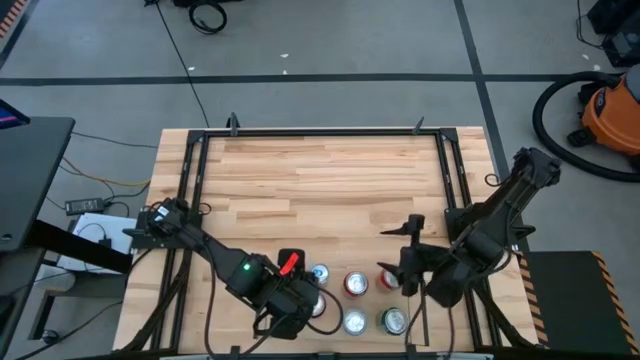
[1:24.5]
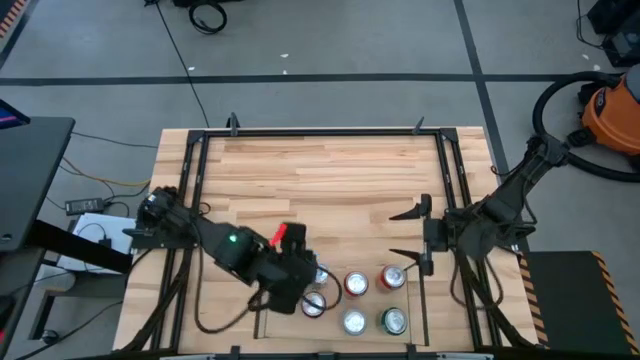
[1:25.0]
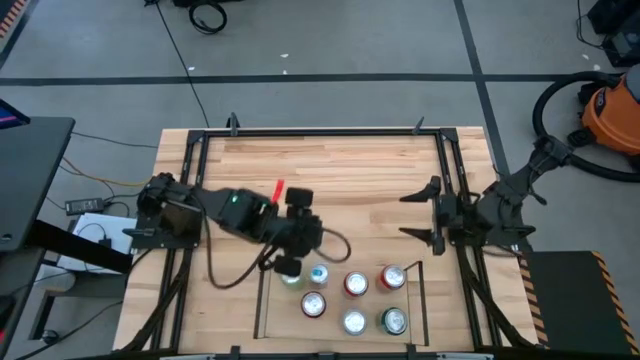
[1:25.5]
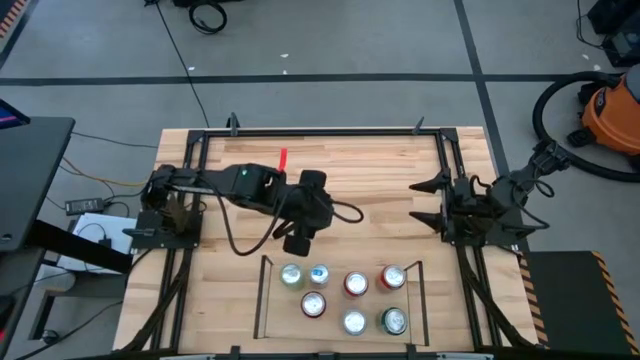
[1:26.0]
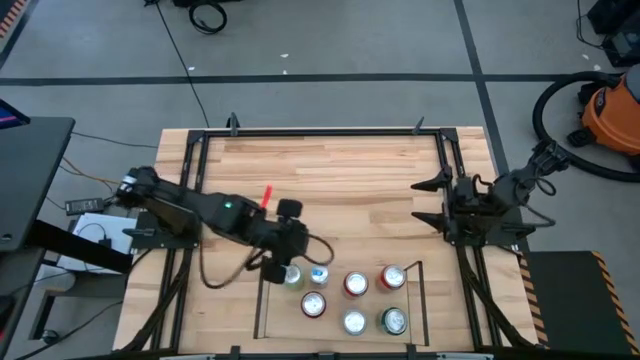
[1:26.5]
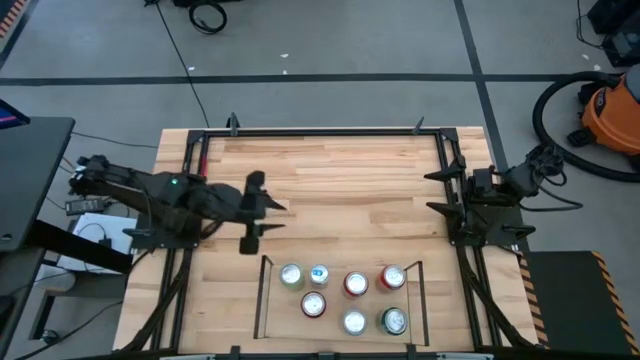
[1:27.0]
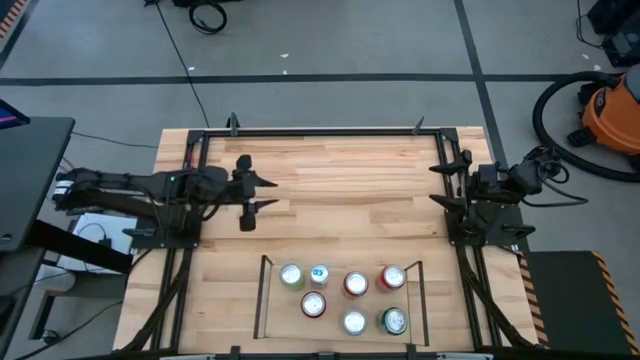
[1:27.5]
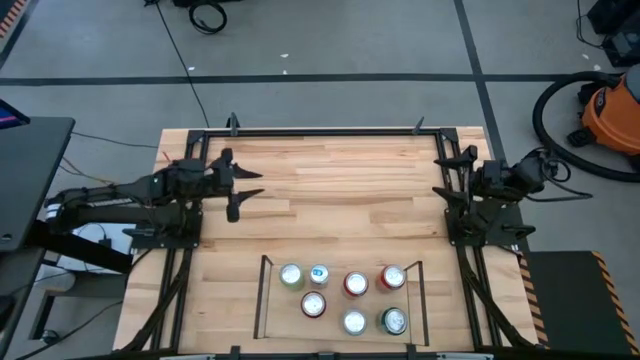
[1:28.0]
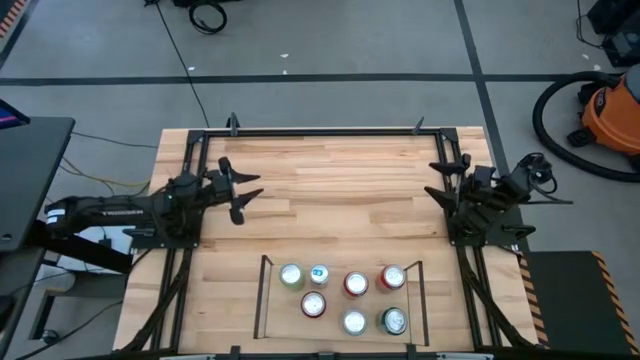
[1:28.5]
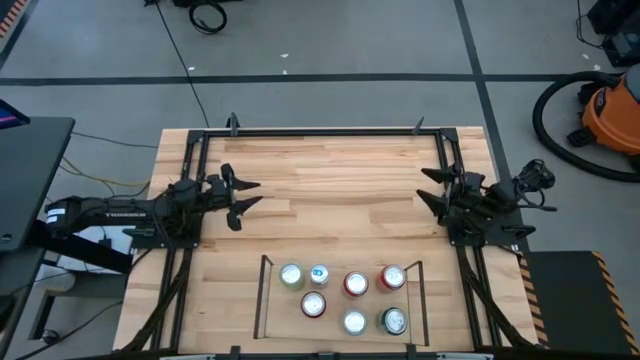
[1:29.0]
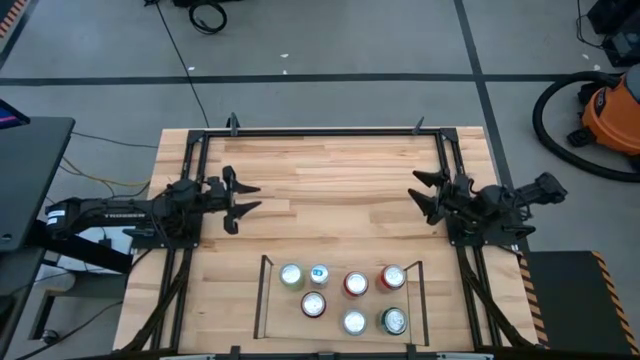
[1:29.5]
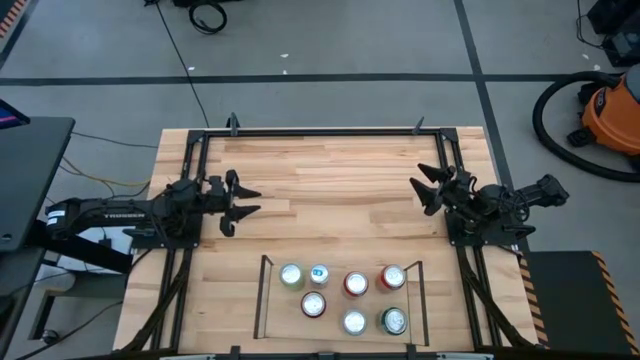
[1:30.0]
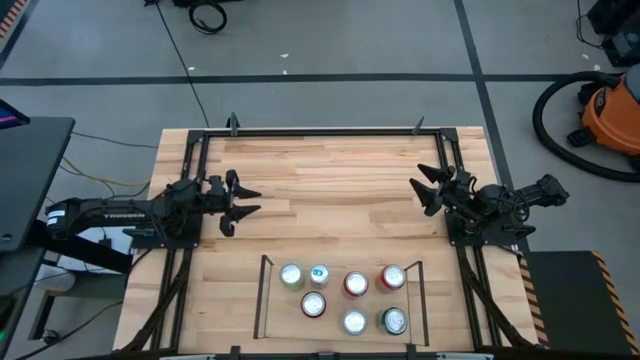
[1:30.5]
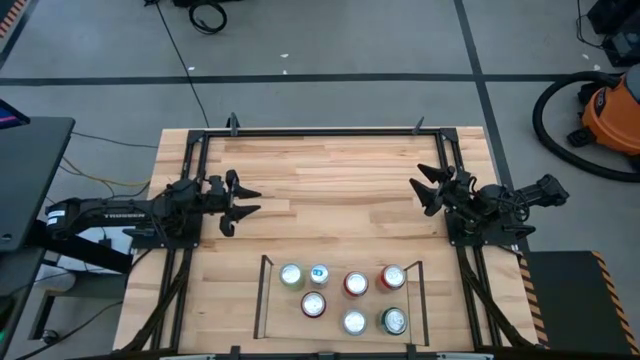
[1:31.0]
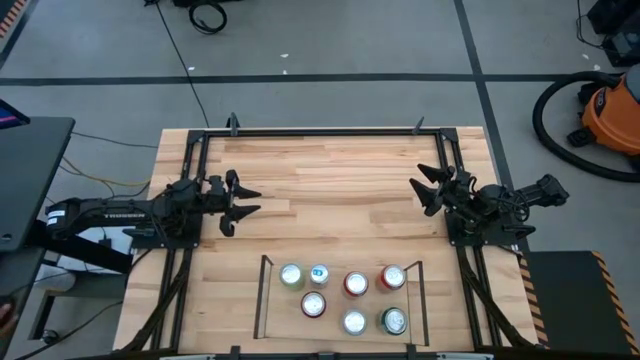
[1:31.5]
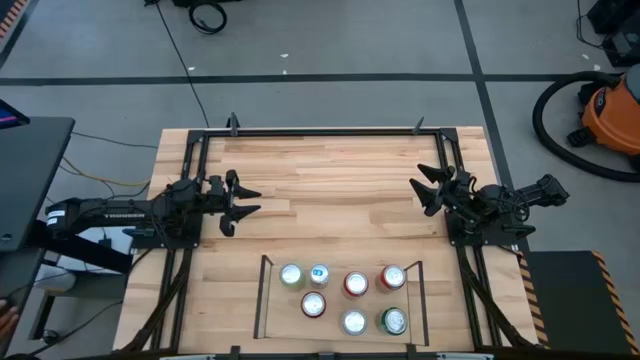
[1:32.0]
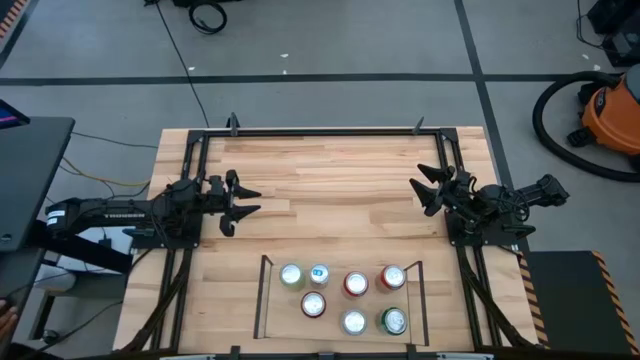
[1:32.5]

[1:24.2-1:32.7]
Task: Place canned beverage on shelf
Return to Home Position

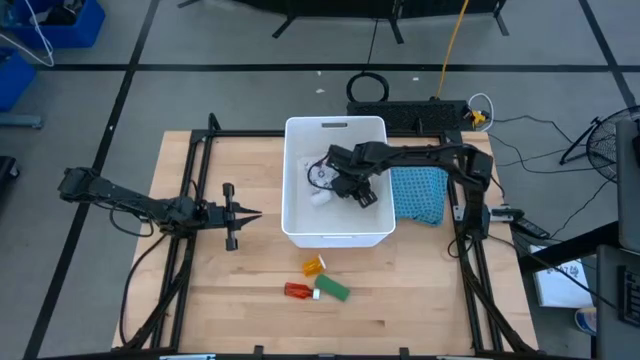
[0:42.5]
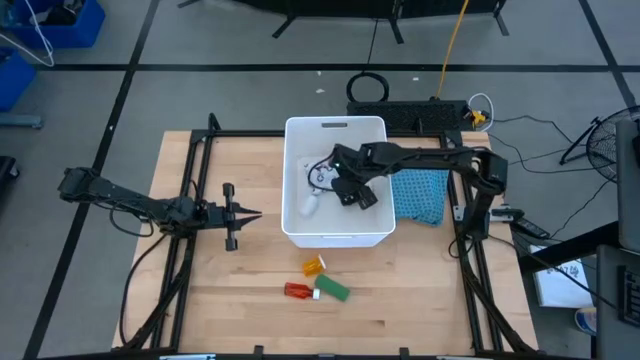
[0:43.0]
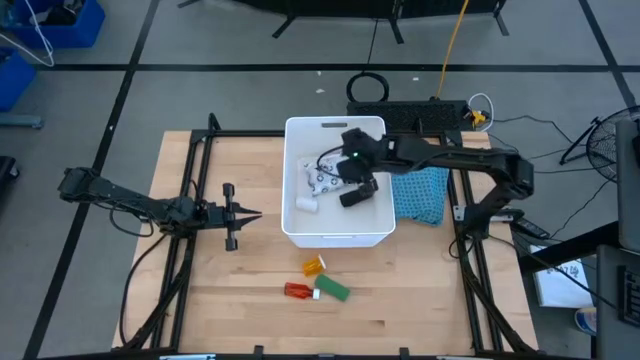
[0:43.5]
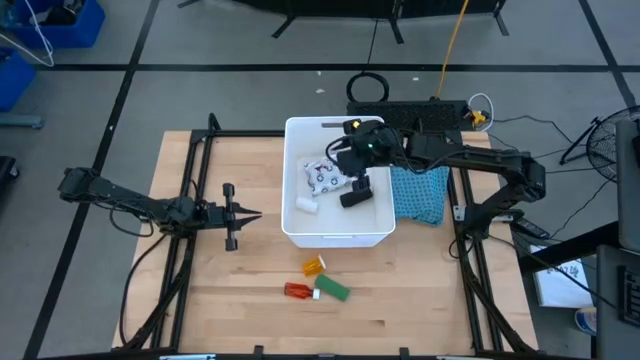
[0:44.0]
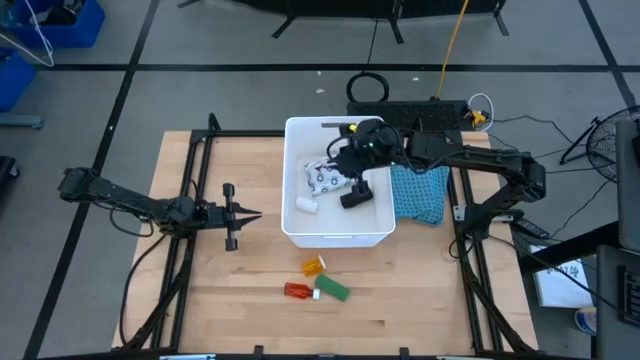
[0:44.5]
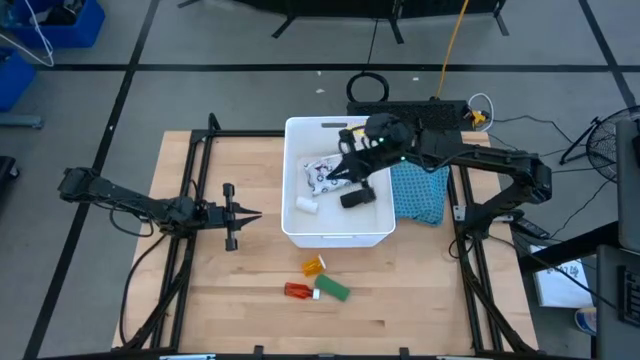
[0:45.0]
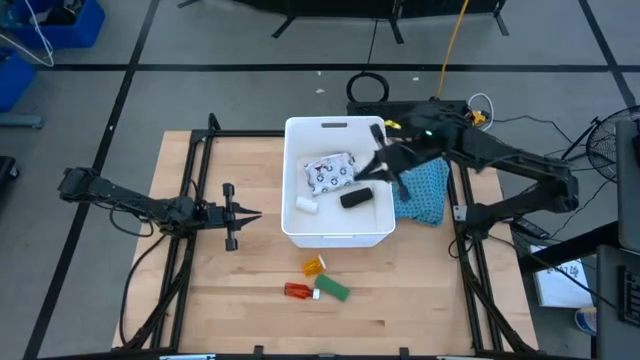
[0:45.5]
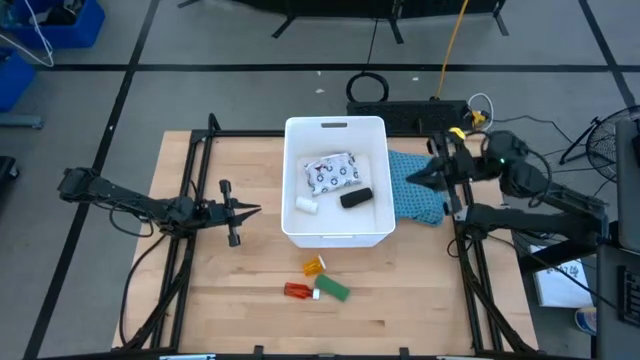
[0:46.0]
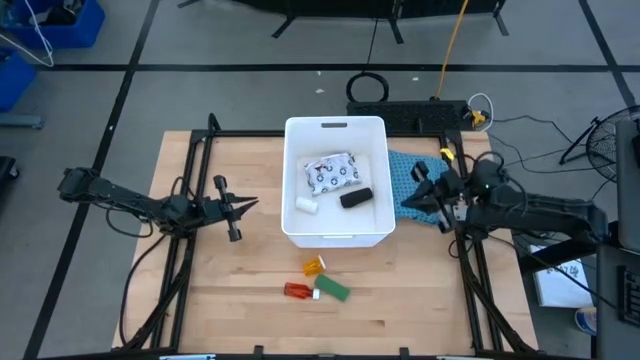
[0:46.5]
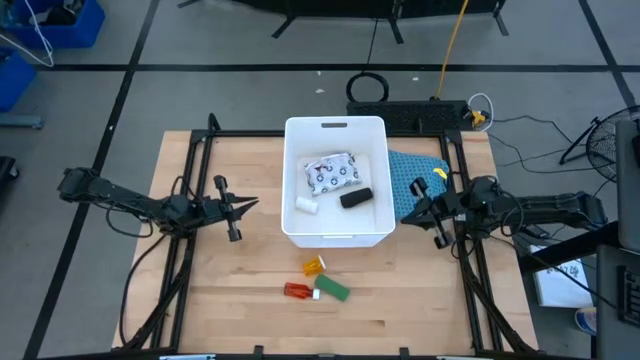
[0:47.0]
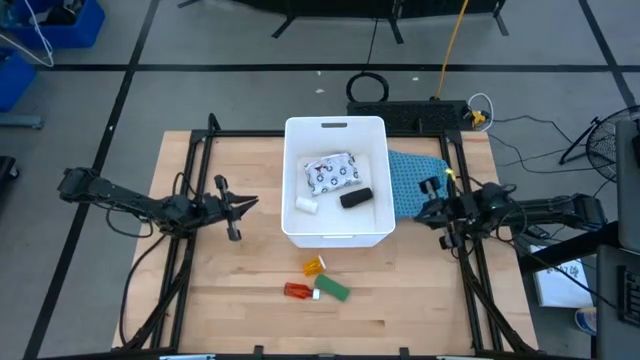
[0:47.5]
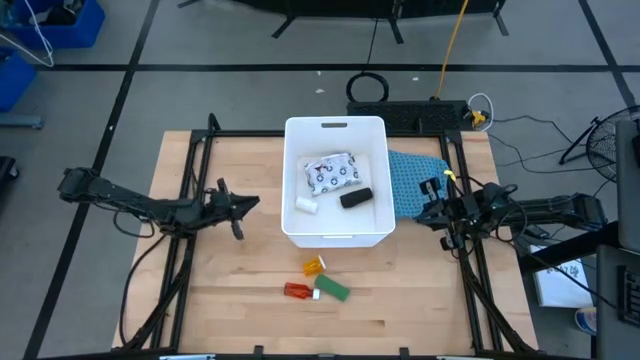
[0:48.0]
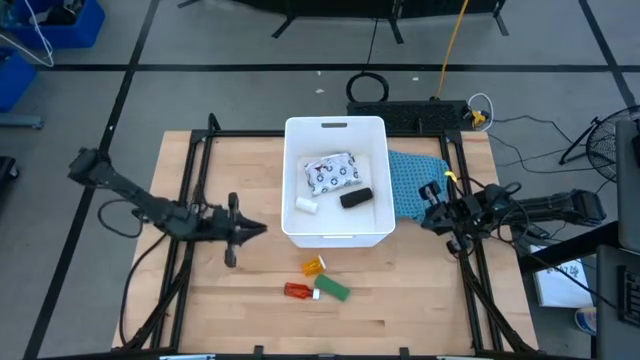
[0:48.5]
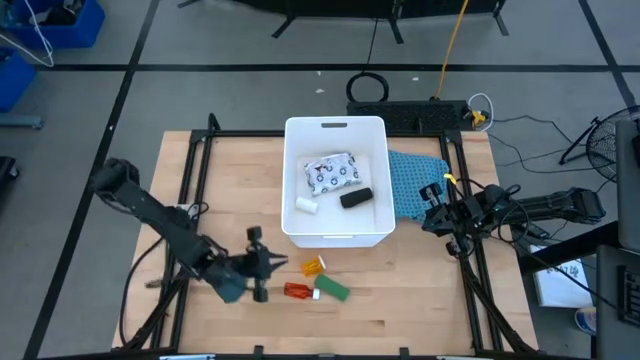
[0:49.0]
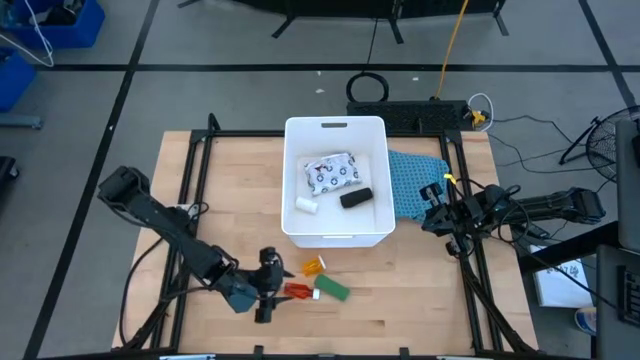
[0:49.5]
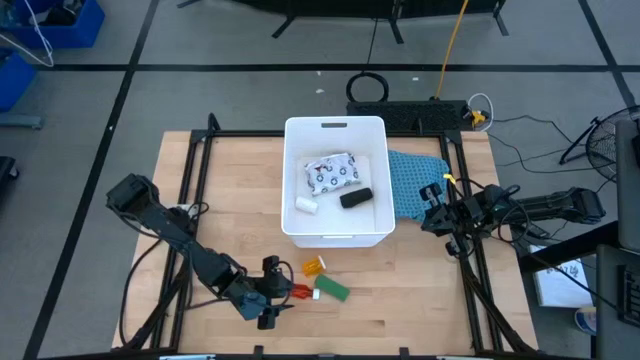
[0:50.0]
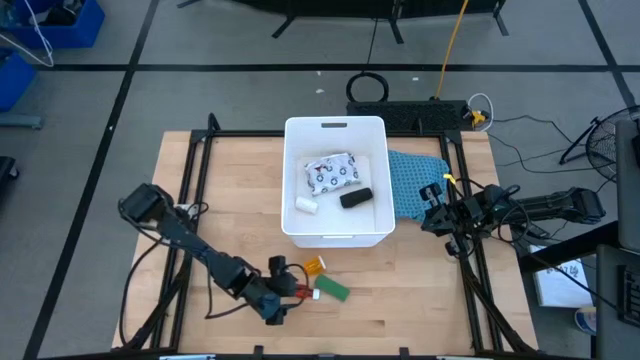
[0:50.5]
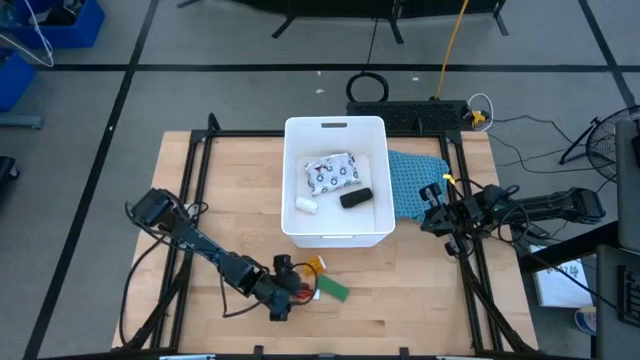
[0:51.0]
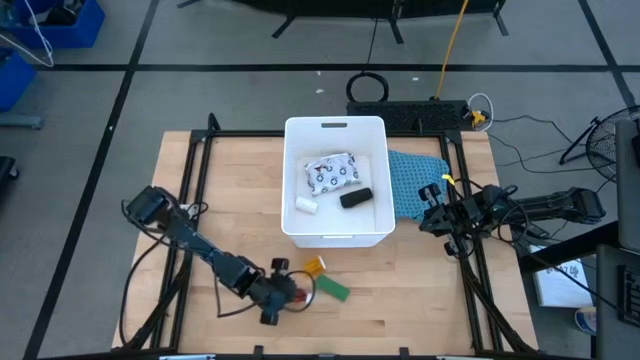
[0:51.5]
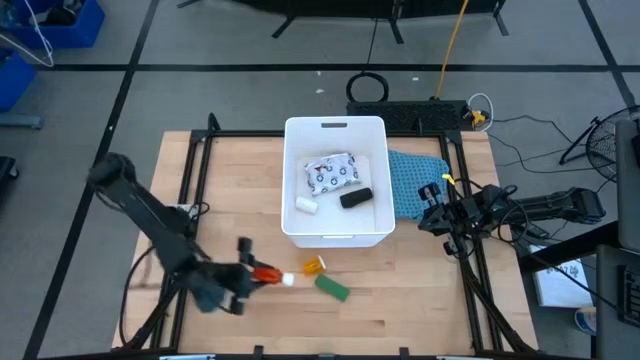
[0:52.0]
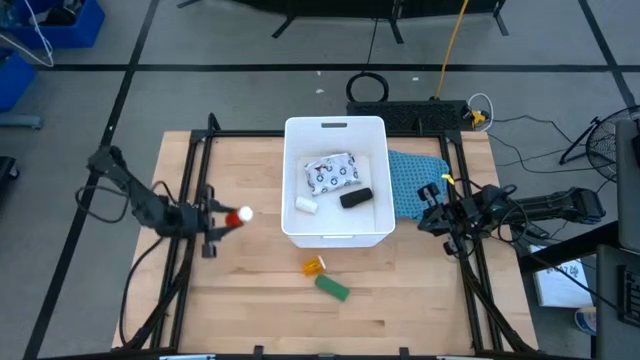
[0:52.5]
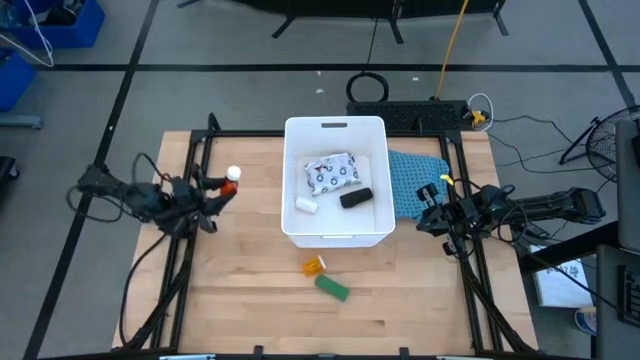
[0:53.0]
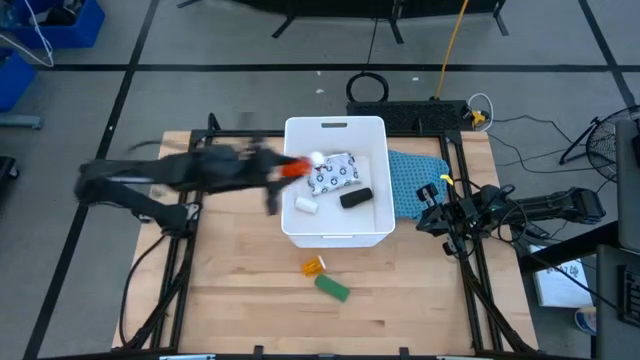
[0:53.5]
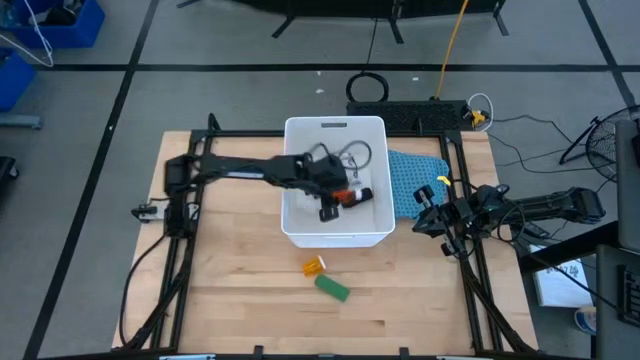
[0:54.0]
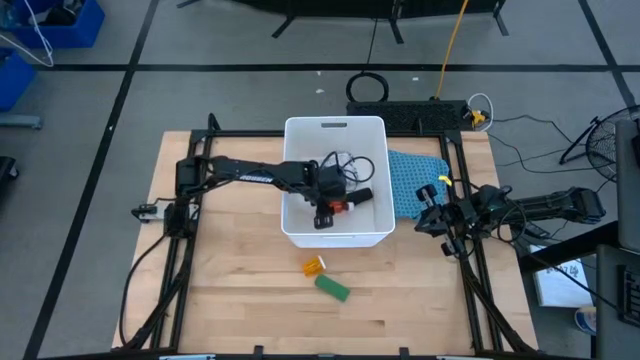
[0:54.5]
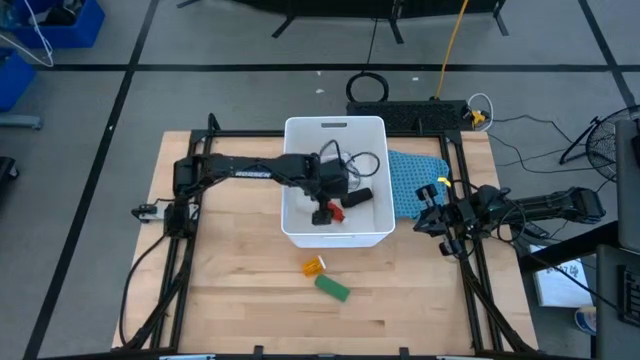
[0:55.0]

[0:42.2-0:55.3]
Task: Pick & place medical supplies in basket/bin
Put the red pill bottle into the white bin
